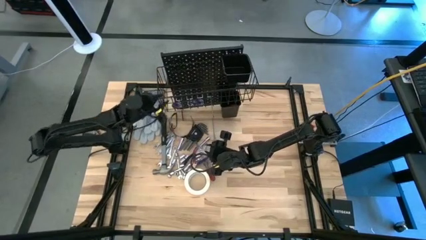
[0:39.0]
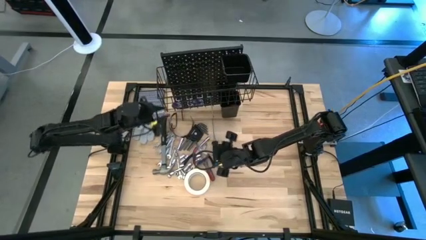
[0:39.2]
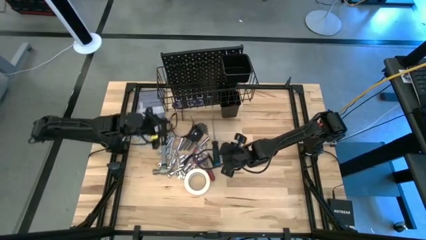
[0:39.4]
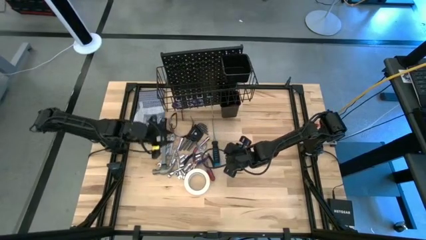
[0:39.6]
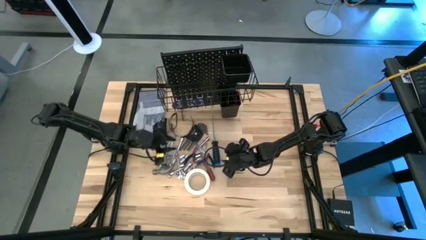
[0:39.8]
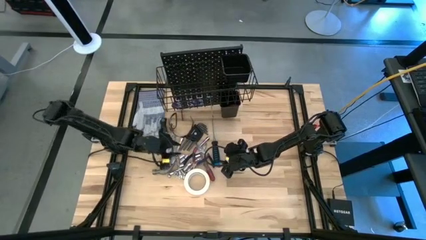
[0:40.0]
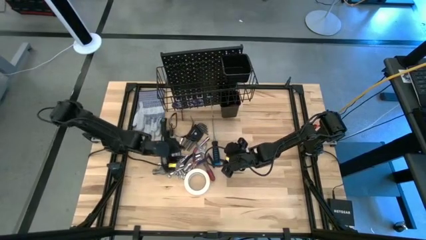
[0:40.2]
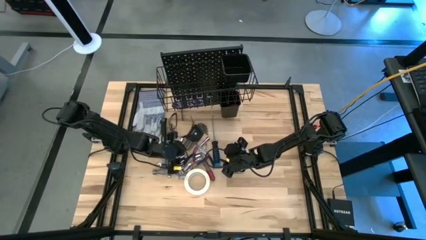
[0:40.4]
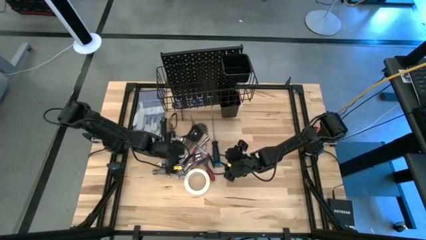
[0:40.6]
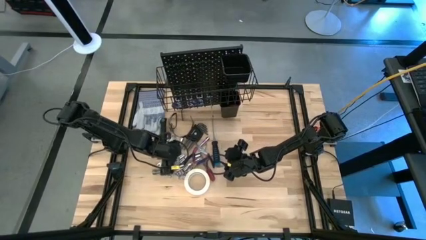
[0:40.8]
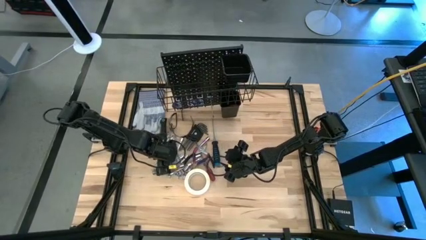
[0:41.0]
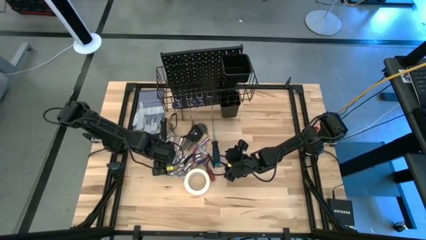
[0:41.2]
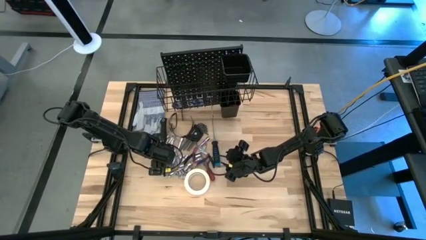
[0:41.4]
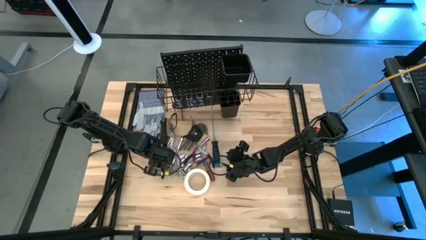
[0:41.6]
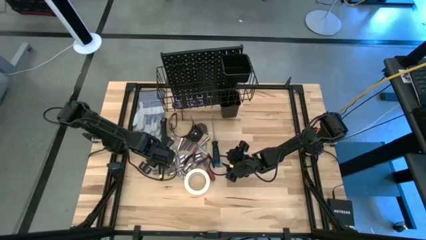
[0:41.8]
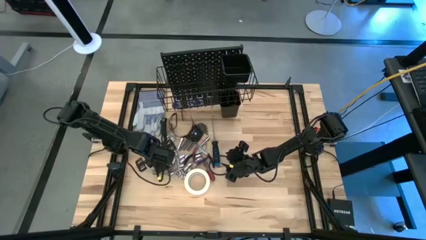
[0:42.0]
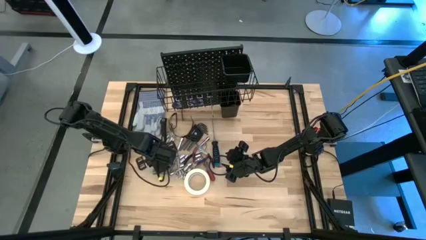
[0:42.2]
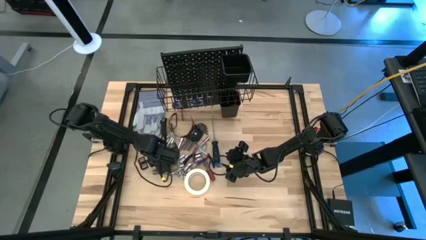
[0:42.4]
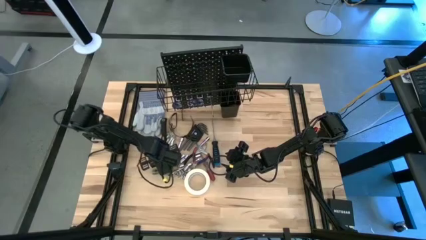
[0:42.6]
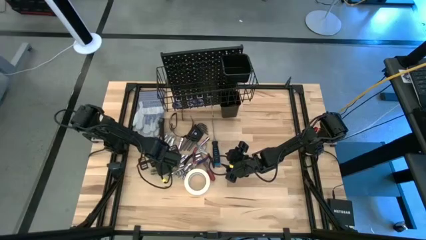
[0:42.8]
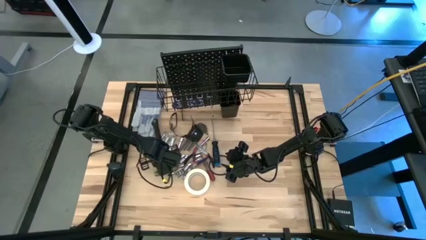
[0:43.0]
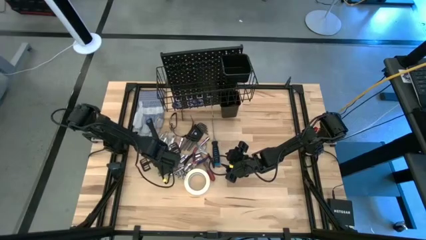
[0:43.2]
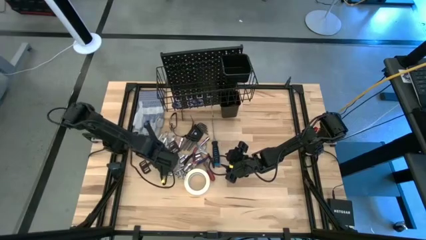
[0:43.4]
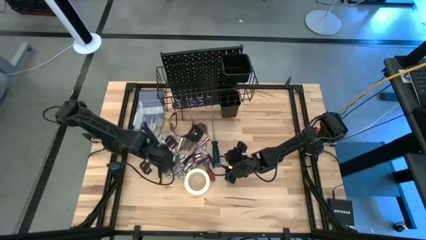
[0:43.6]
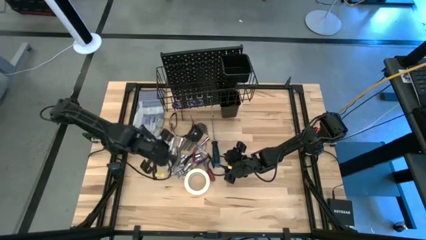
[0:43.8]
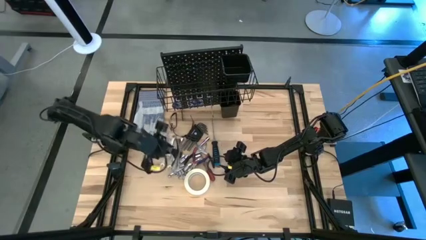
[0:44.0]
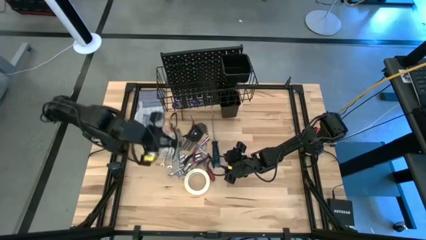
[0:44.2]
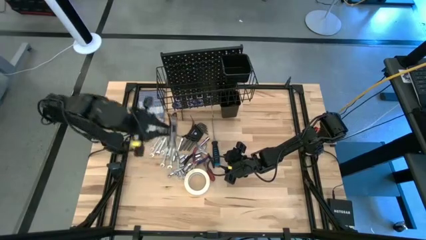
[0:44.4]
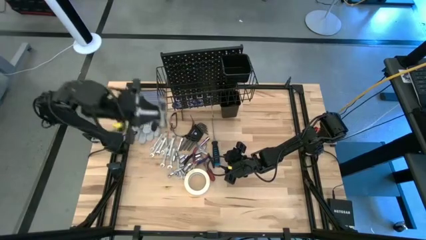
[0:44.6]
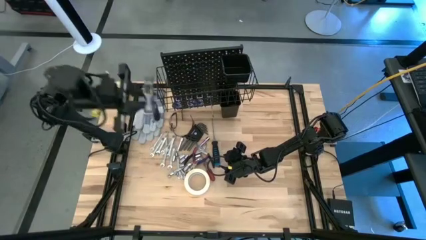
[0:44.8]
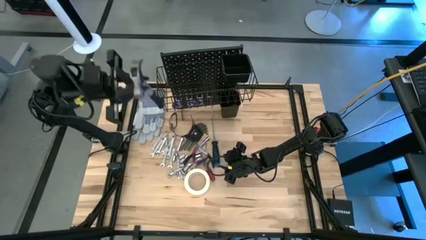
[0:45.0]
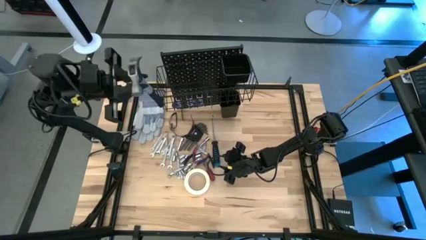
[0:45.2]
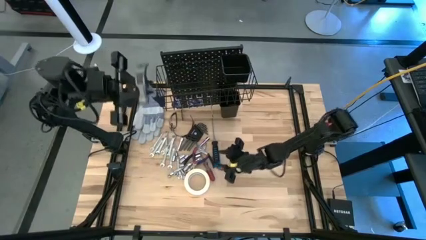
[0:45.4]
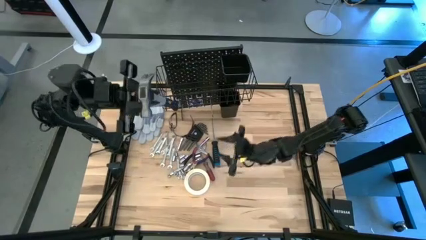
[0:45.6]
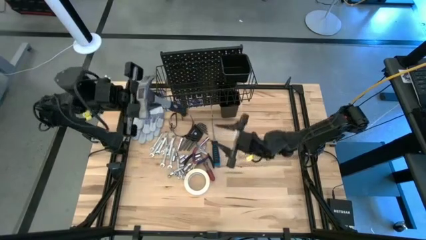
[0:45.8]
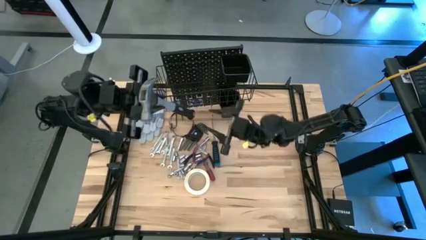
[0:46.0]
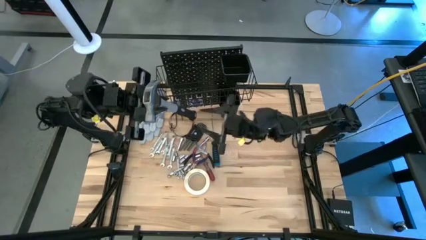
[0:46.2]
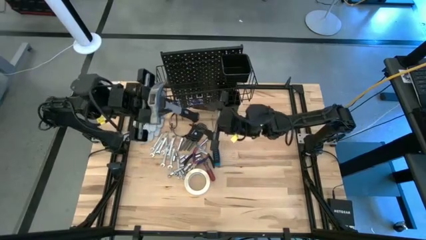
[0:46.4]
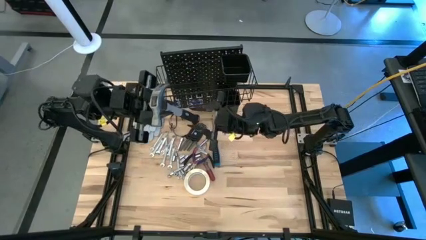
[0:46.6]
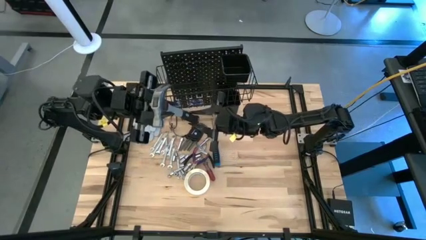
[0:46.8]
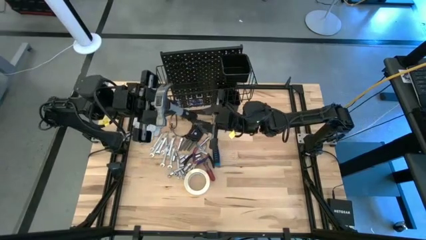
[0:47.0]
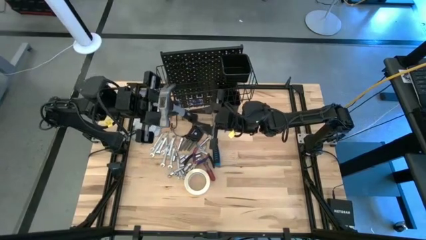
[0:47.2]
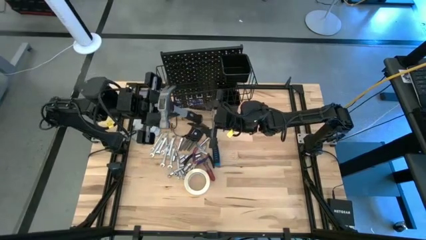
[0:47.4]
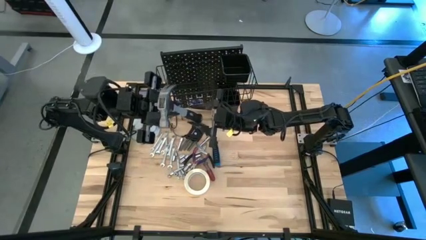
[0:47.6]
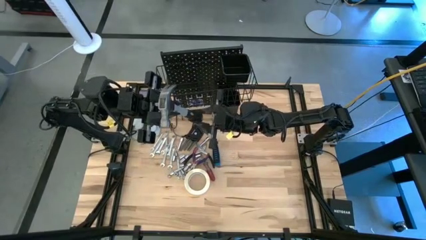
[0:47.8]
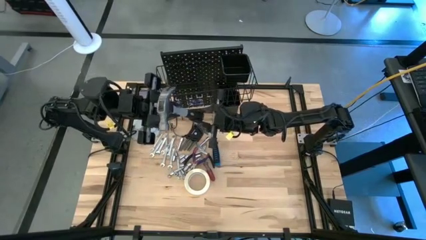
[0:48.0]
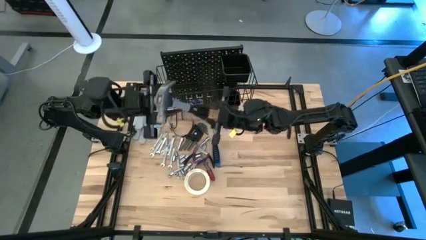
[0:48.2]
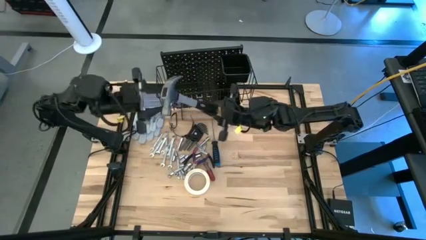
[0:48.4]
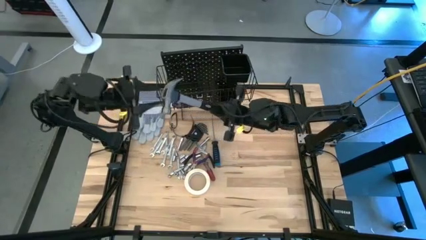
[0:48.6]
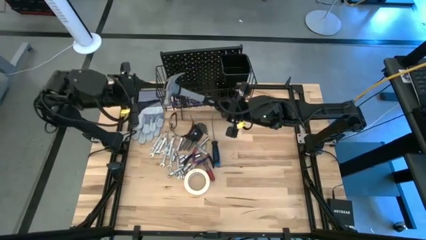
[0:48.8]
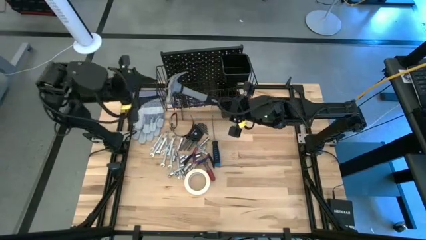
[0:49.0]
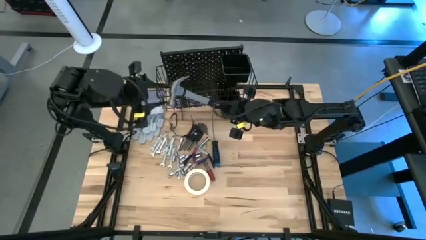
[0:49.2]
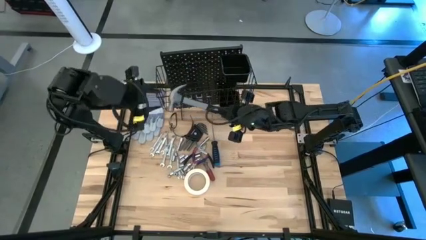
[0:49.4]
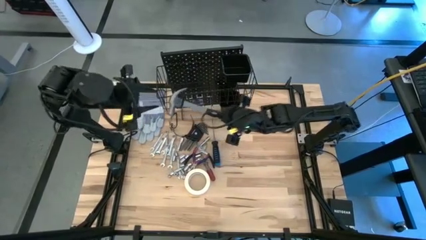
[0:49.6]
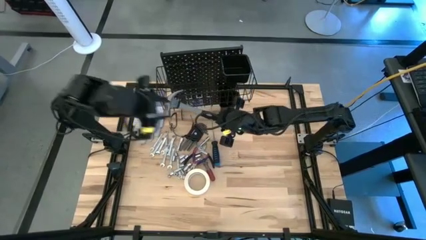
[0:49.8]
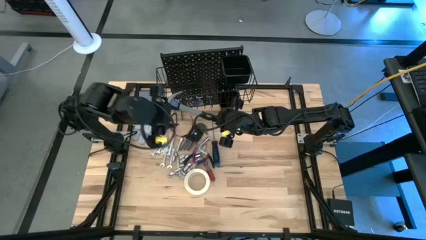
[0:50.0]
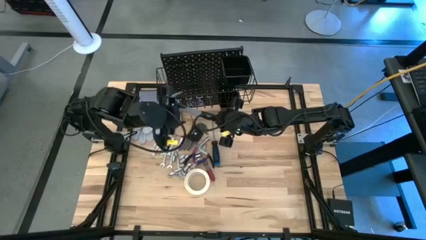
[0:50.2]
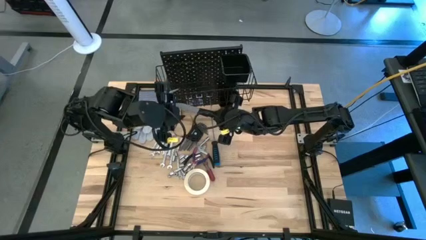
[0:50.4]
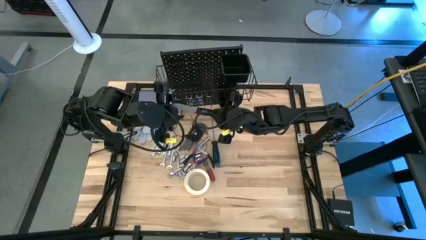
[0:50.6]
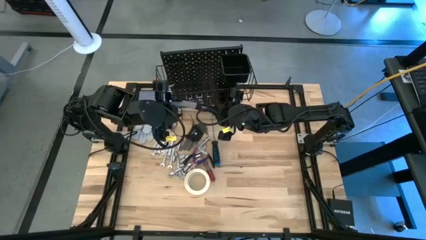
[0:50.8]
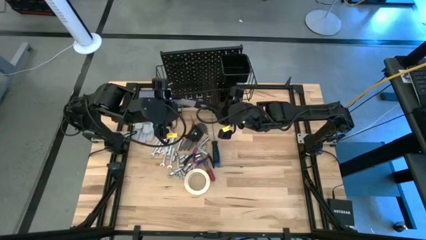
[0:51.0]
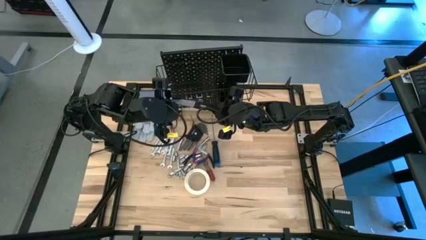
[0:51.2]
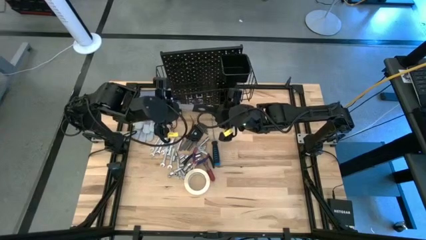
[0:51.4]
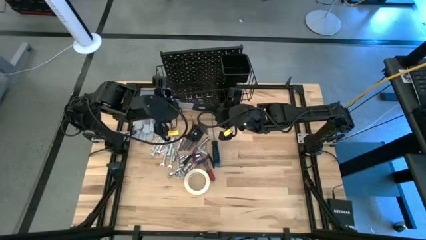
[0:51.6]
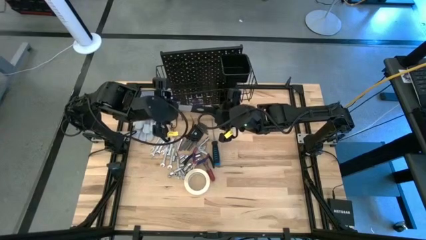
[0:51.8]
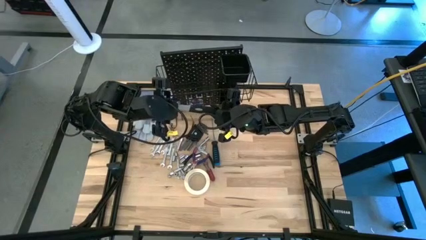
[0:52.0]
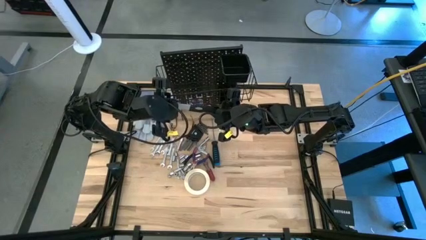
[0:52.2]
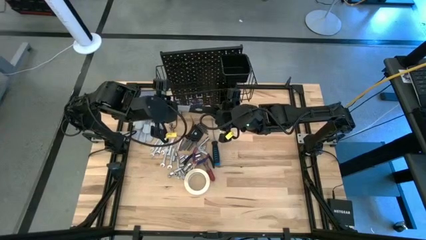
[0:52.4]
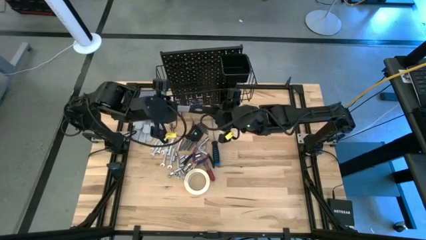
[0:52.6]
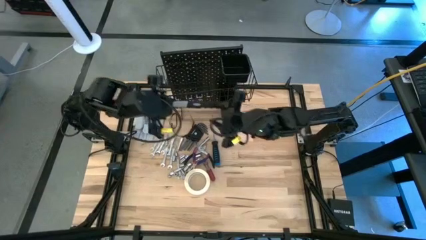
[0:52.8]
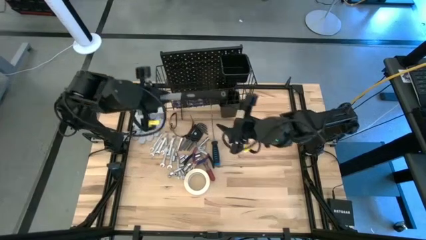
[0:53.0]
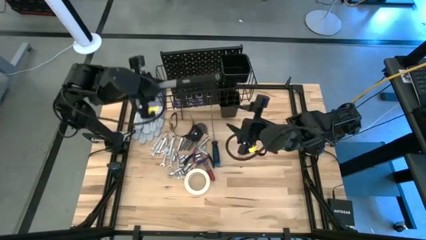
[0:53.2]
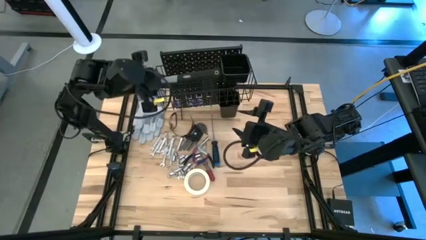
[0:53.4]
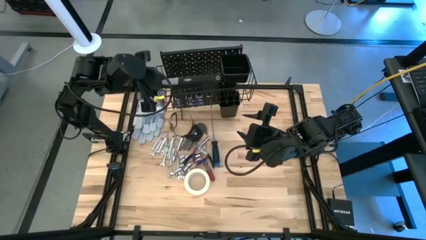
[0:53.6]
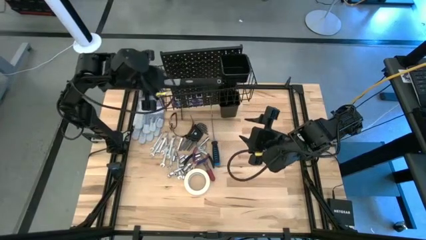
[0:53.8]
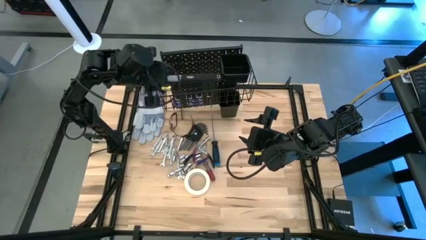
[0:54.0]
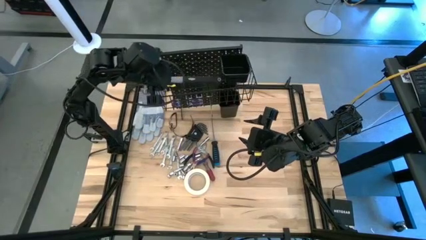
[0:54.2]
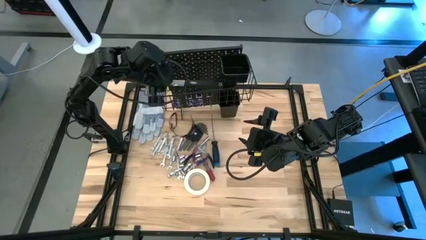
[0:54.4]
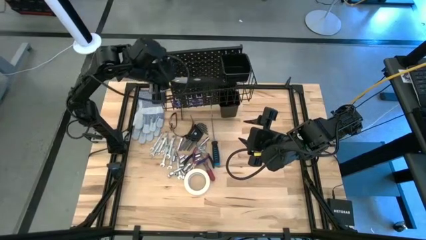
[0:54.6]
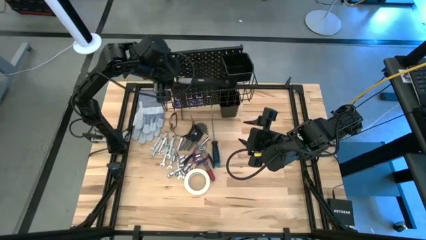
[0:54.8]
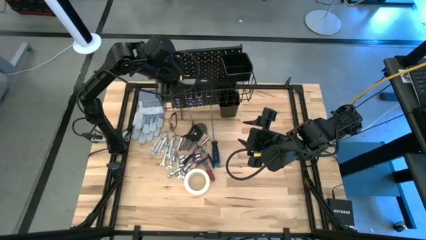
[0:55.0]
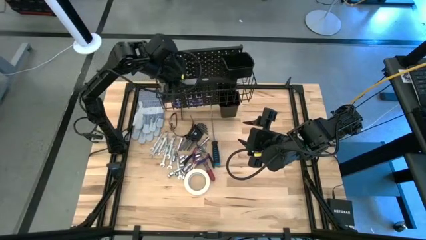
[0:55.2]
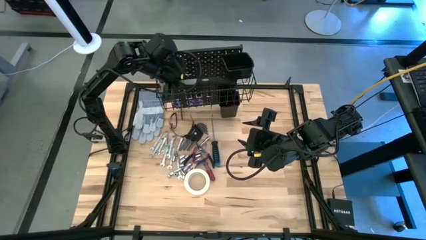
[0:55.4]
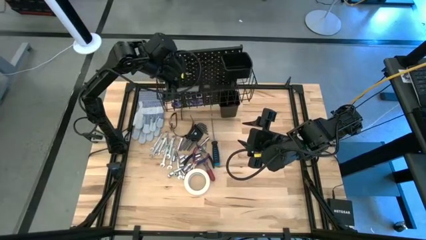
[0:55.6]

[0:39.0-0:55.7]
Task: Hang tools onto peg board
Put the hammer into the wire basket on the pegboard
